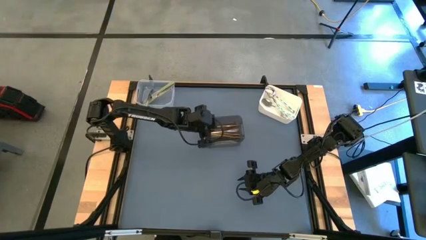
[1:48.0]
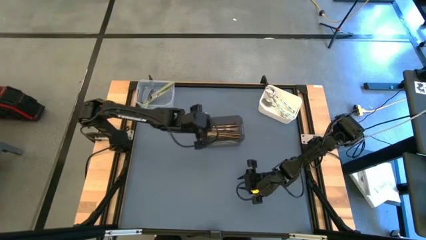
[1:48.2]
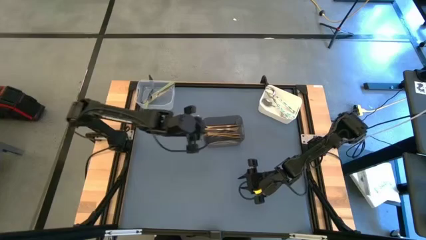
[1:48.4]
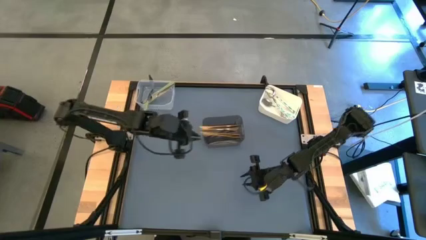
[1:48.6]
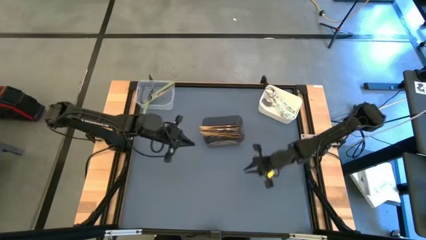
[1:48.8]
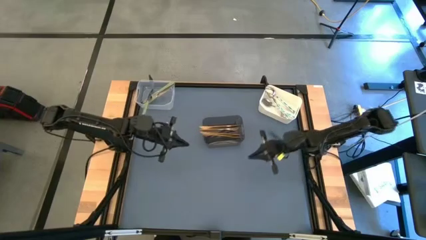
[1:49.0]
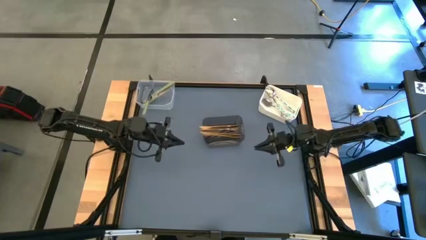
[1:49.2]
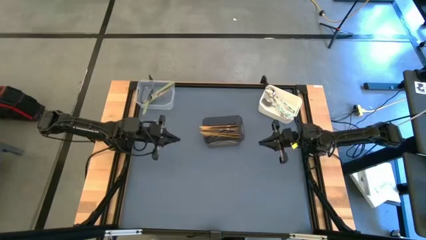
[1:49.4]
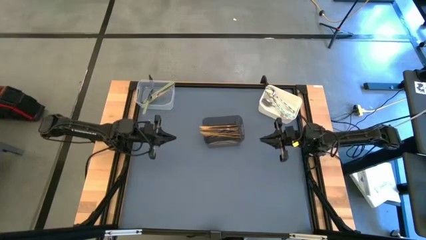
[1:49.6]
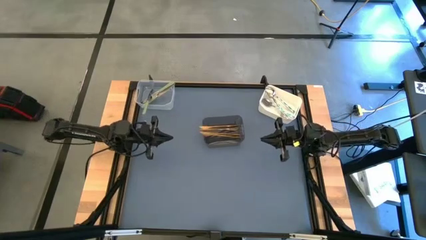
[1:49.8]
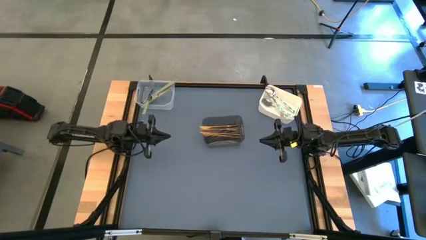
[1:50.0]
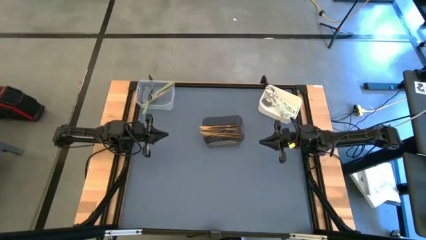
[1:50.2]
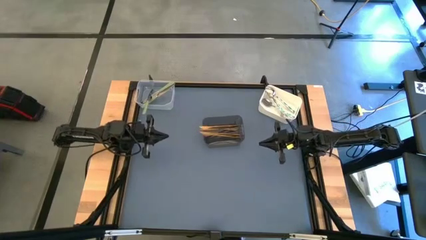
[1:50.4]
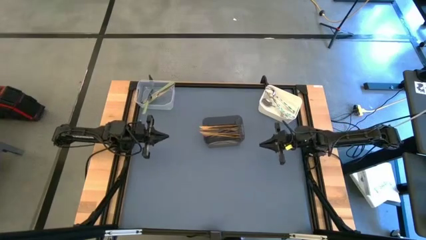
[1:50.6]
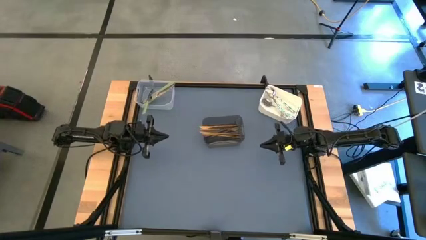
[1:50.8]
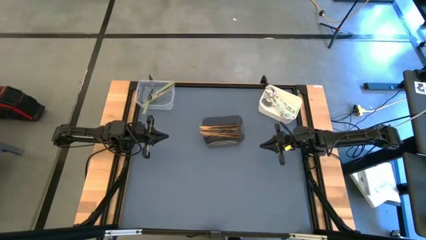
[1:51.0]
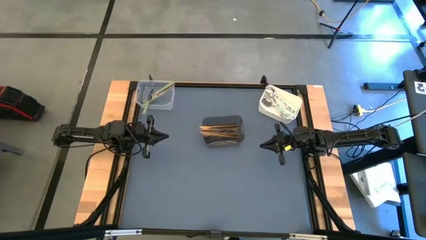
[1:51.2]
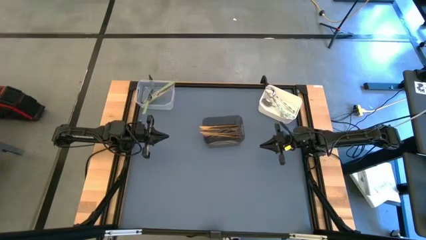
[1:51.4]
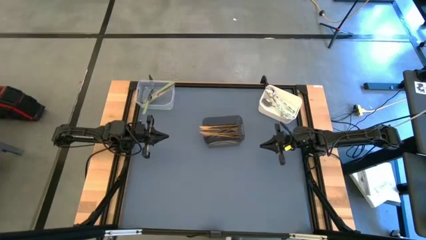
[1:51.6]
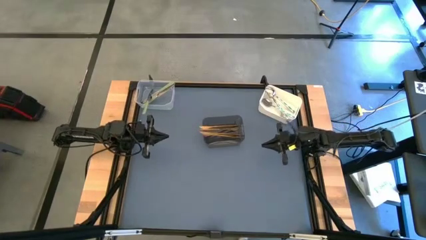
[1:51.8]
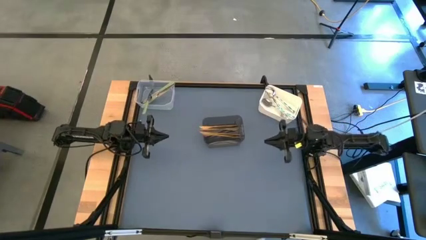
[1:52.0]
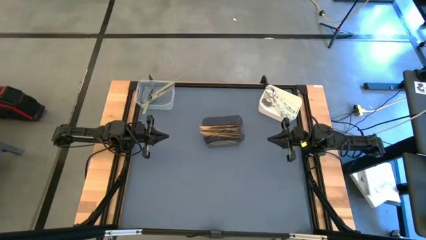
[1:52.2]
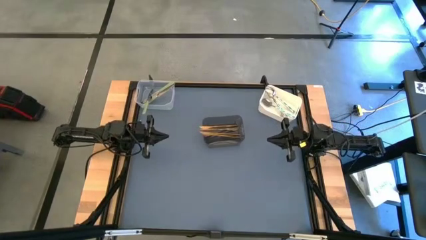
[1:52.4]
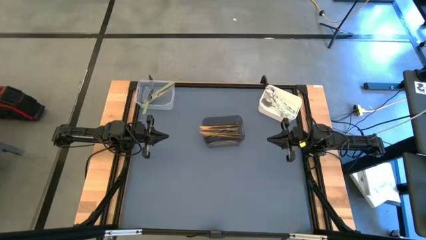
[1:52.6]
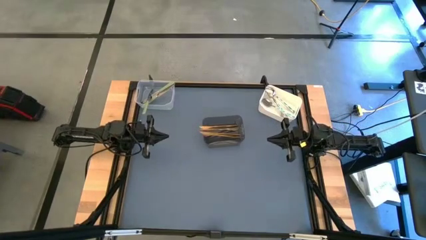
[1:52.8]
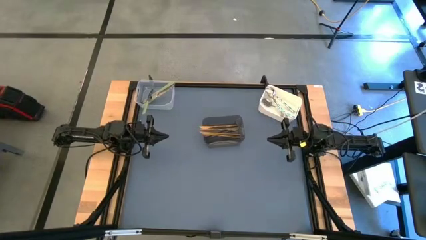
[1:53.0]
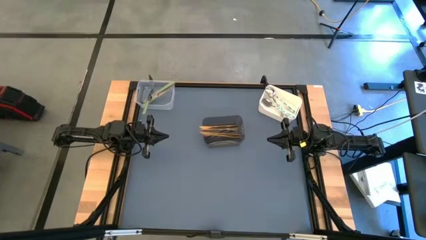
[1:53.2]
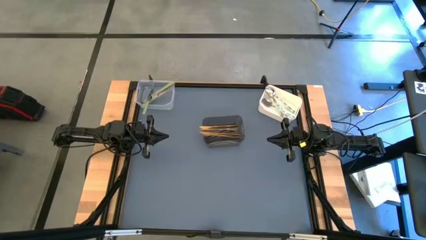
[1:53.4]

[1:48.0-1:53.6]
Task: Sort silverware by color (type)
Return to Home Position

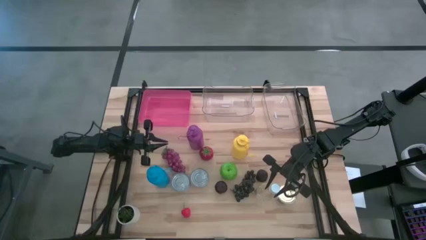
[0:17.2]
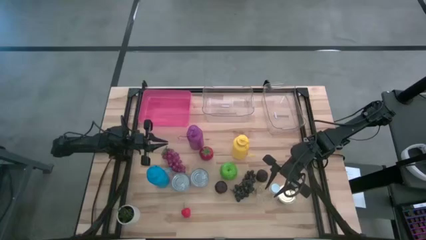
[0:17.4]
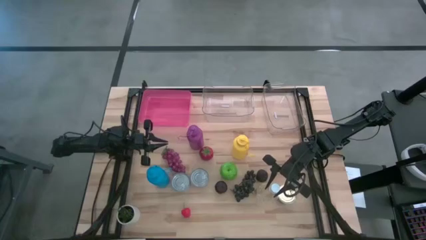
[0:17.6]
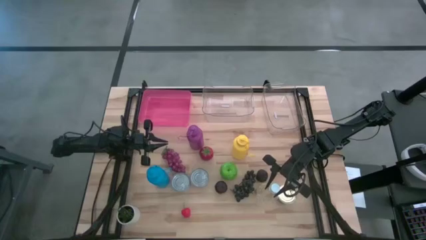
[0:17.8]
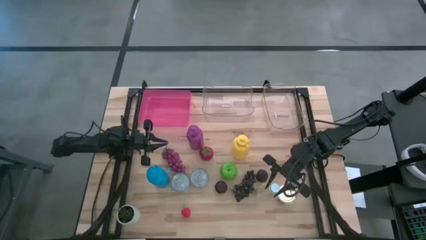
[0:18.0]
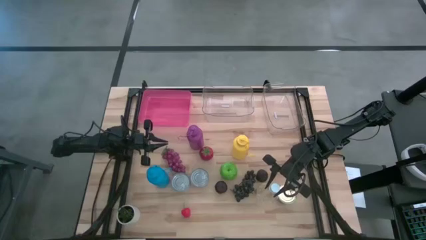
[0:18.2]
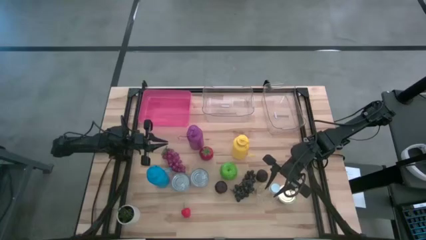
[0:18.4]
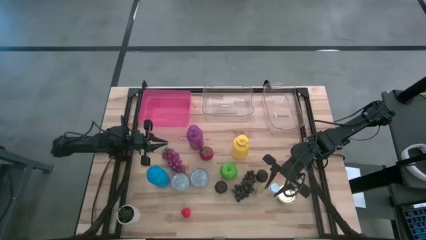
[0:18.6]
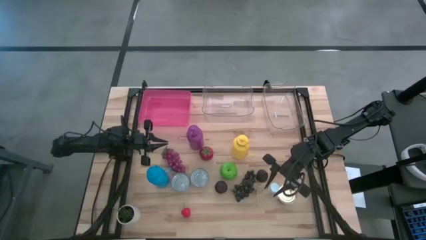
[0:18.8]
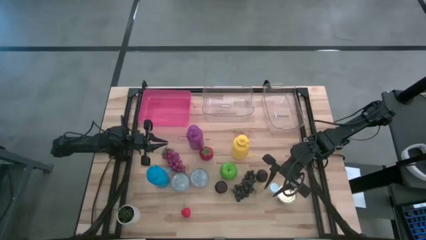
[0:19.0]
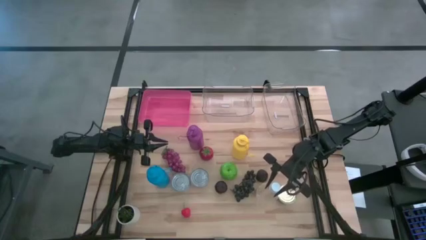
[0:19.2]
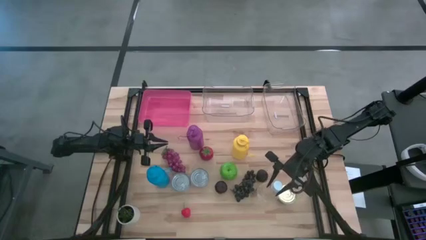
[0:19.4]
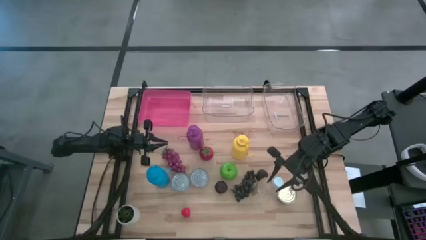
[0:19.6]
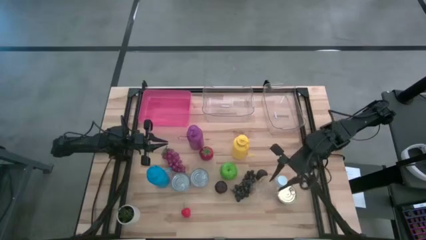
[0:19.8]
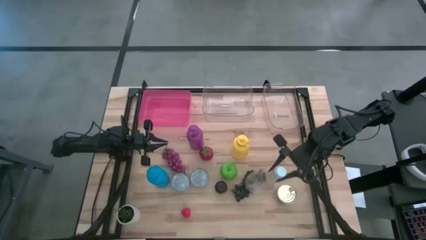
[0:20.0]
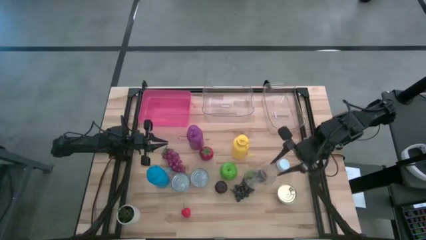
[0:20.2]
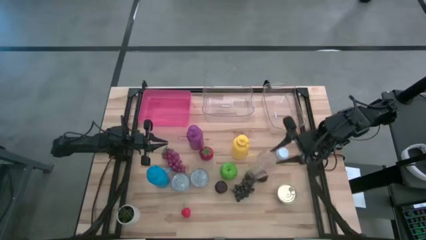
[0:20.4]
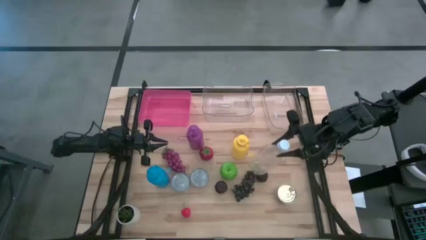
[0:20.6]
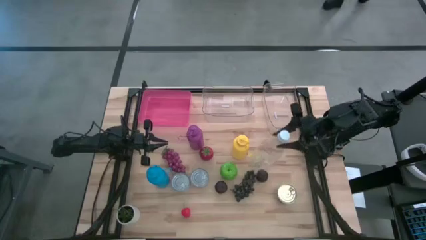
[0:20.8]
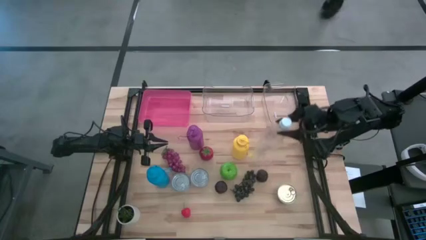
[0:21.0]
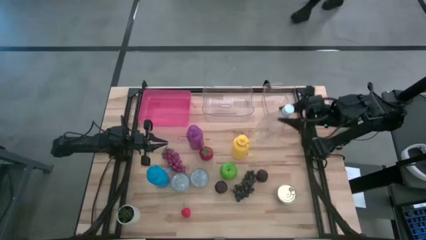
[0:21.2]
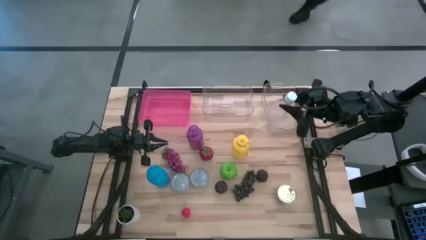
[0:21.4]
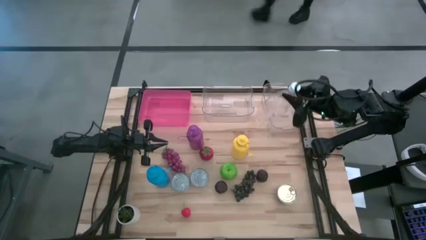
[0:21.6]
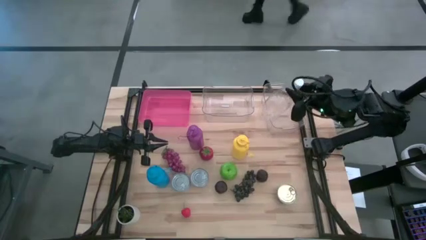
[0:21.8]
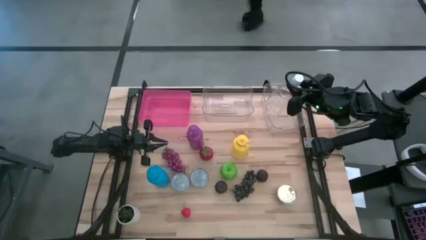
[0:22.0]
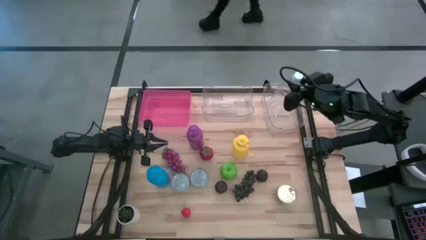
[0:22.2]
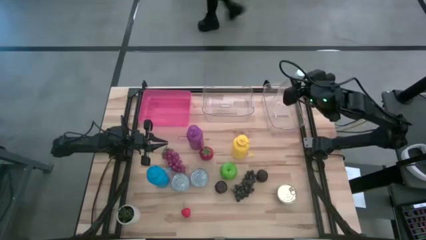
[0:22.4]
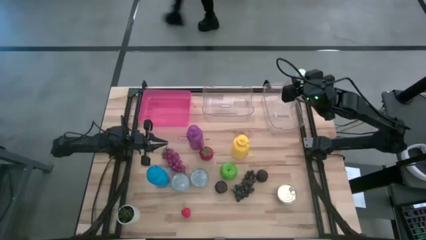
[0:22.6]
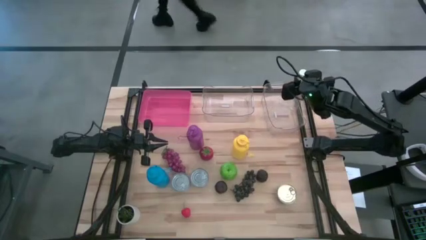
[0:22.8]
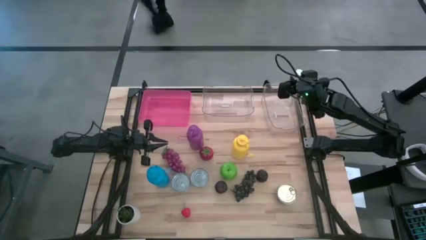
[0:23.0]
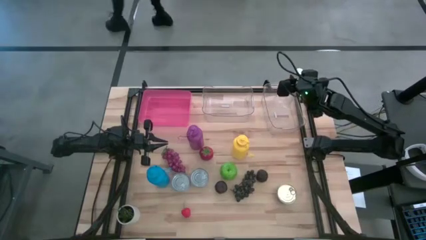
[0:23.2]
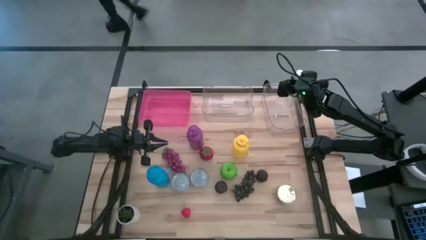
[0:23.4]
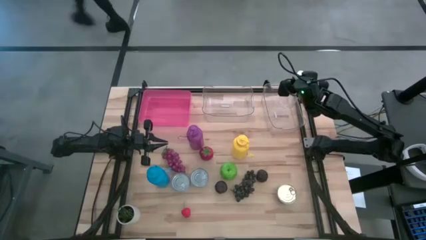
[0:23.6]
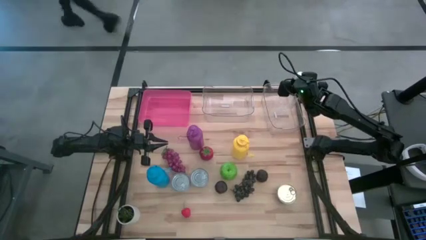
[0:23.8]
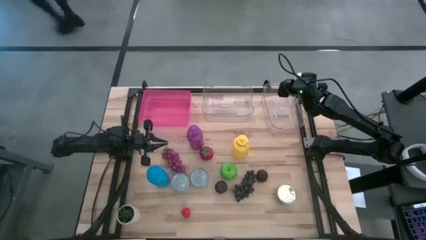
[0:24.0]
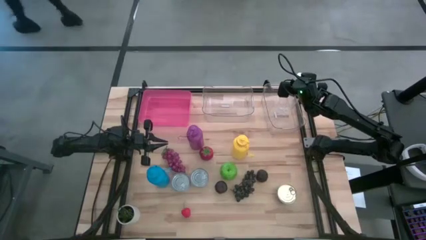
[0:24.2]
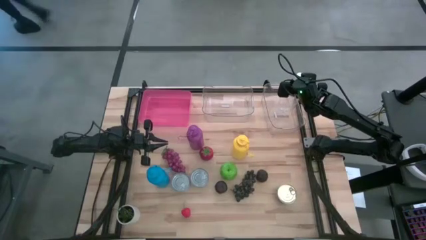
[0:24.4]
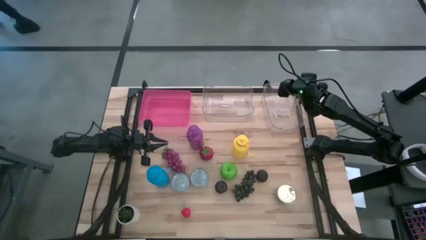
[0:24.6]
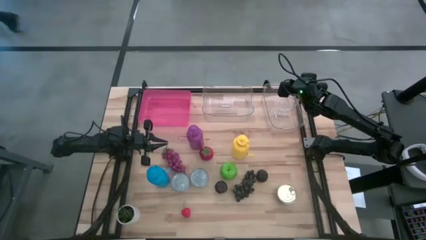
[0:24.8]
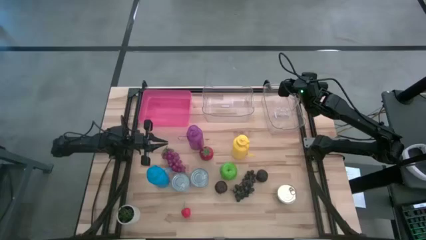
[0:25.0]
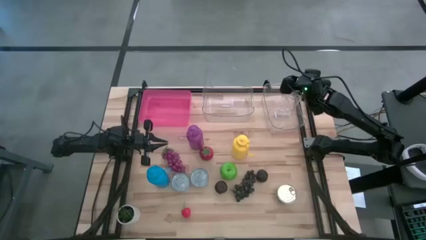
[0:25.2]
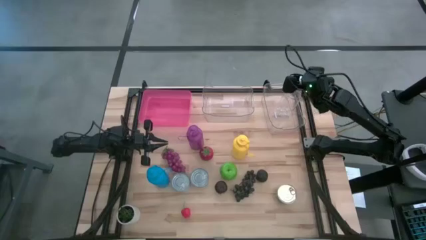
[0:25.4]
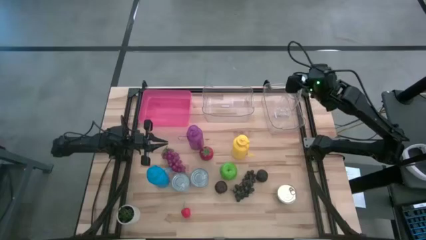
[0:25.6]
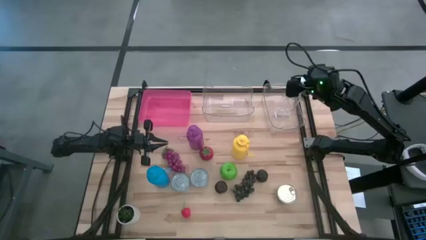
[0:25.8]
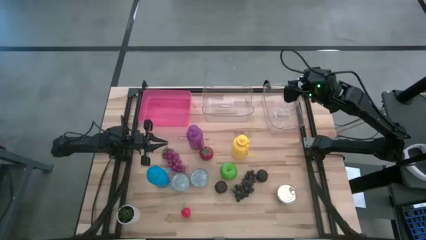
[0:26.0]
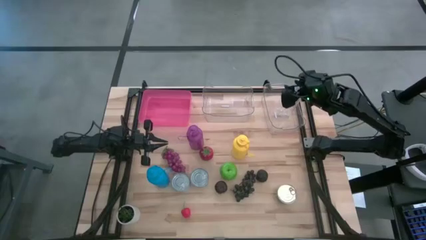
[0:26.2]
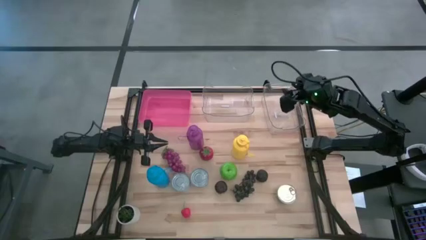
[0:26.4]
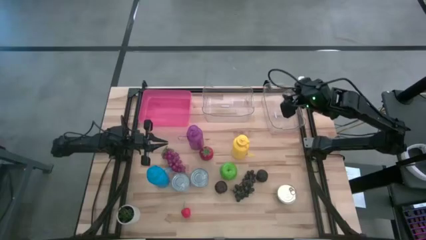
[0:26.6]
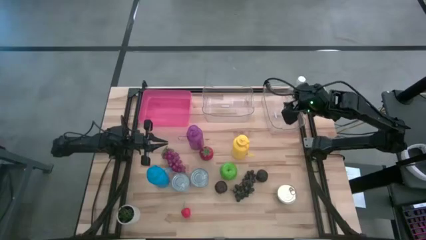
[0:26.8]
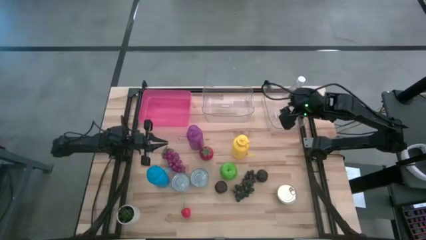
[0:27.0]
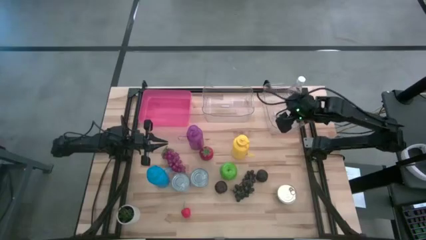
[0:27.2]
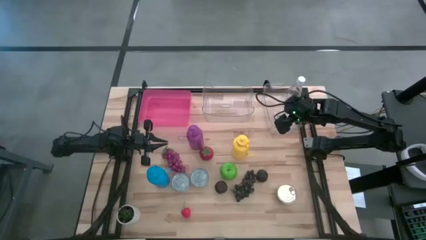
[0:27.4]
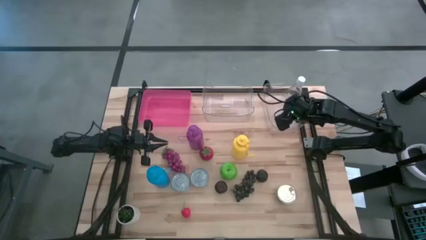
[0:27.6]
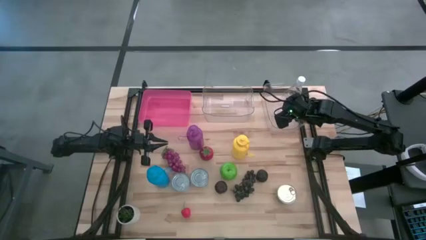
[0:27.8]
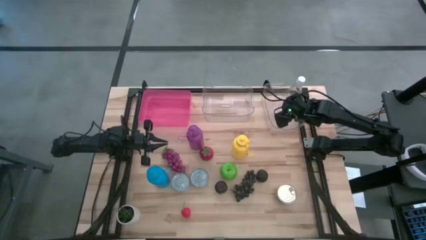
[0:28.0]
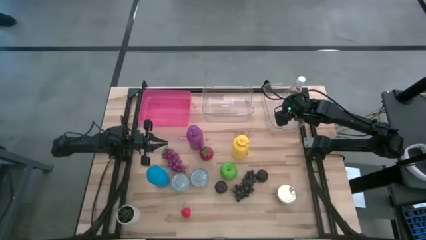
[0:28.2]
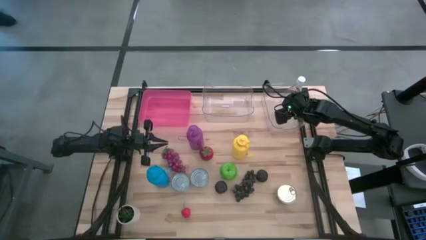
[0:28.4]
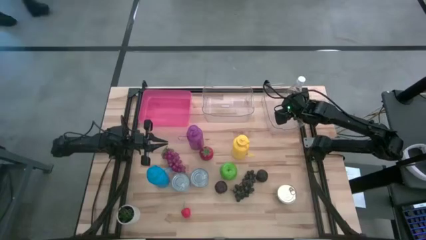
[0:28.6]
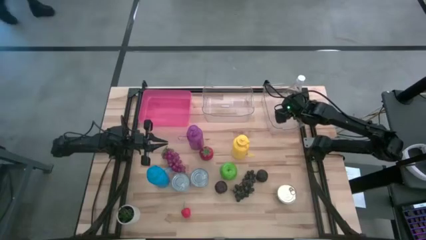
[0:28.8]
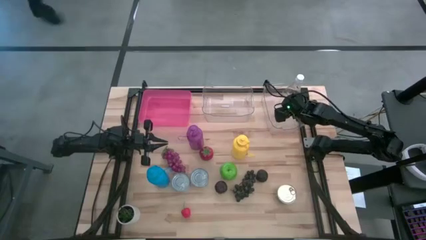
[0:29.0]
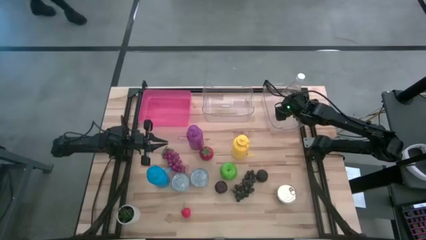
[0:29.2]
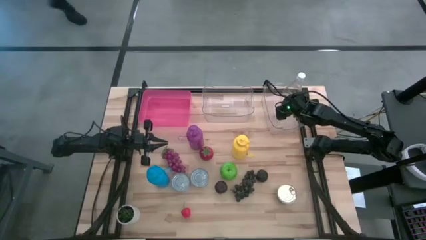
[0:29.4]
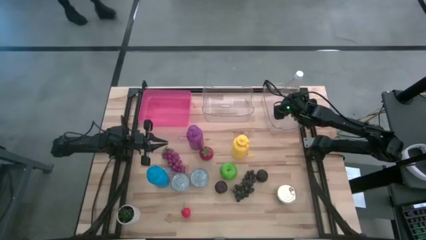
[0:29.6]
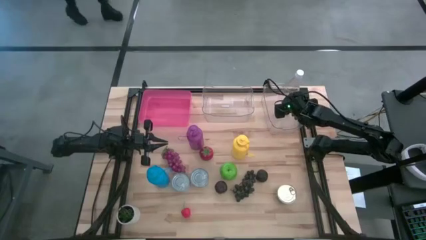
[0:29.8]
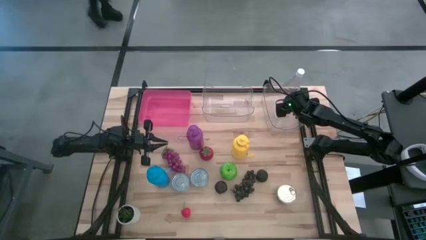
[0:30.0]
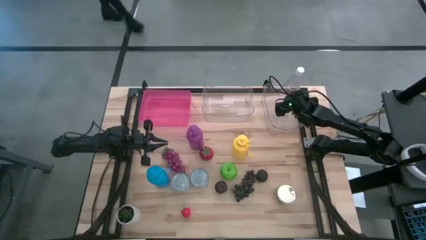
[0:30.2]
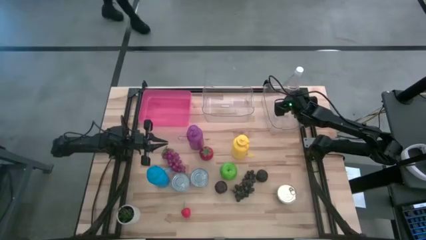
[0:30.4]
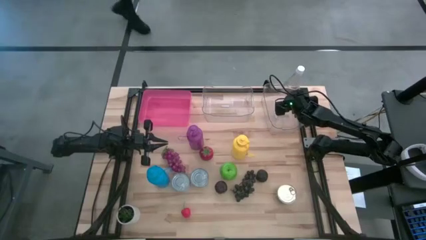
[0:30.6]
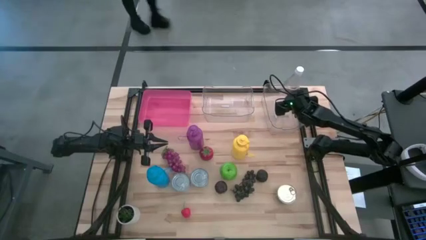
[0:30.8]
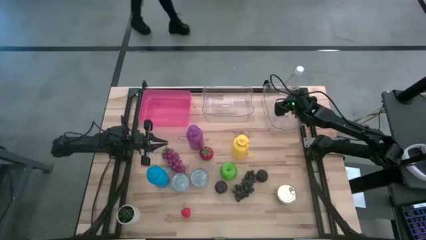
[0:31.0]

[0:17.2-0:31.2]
Task: Pick & Place Food Item
Put the transparent water bottle into the right transparent bin
